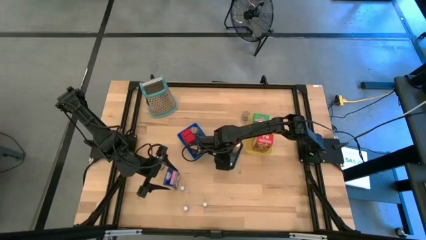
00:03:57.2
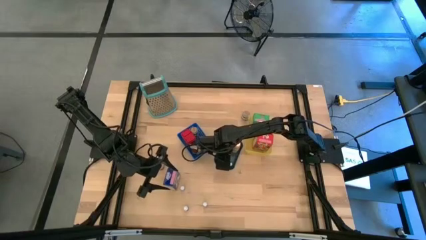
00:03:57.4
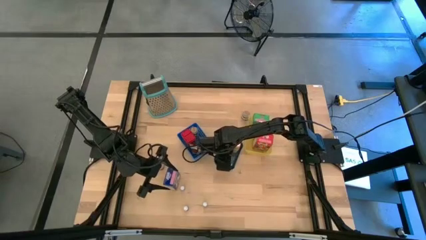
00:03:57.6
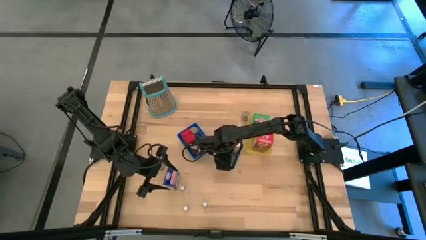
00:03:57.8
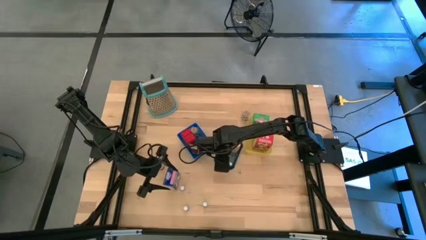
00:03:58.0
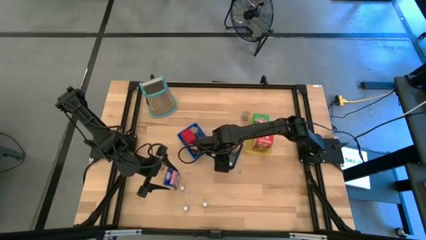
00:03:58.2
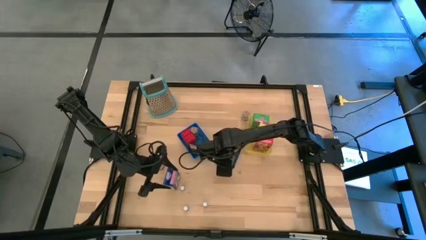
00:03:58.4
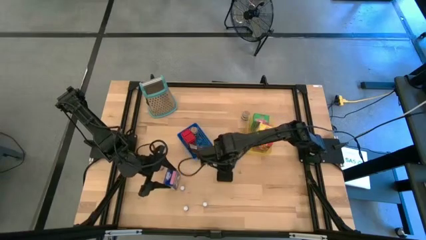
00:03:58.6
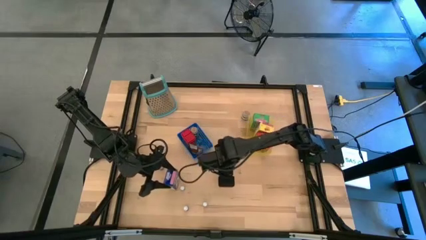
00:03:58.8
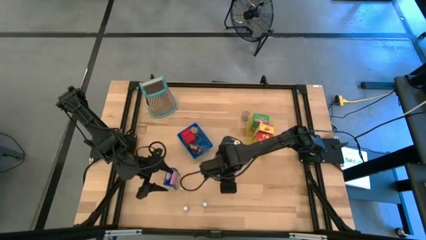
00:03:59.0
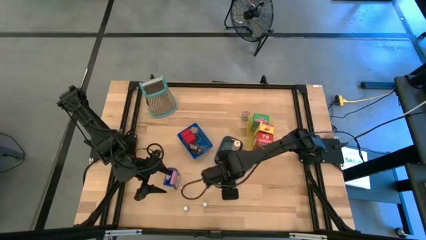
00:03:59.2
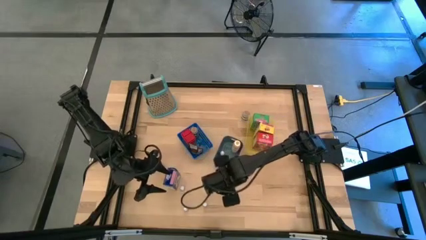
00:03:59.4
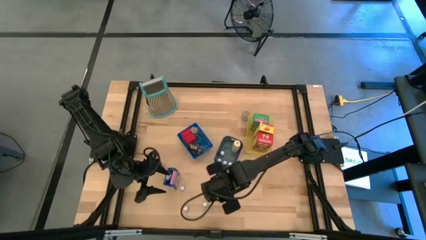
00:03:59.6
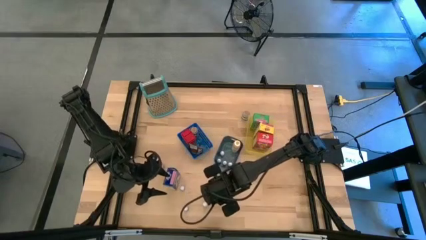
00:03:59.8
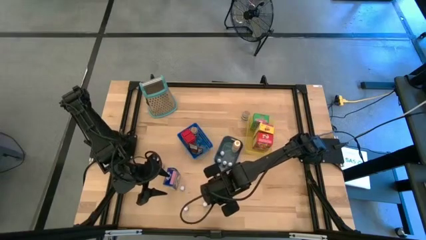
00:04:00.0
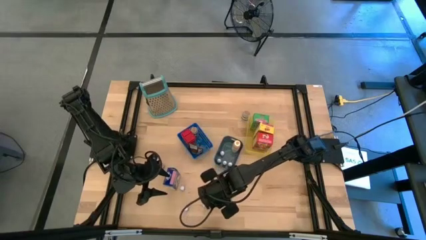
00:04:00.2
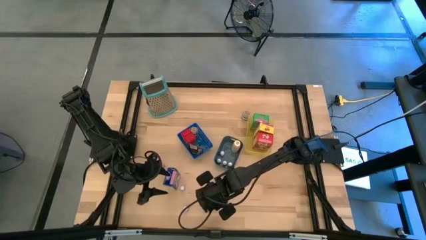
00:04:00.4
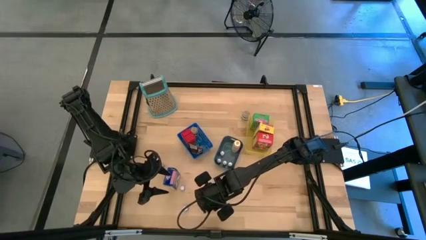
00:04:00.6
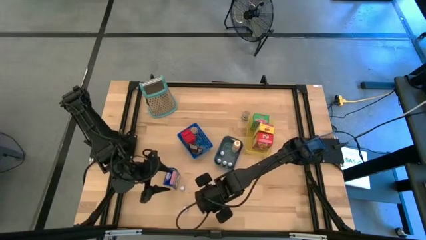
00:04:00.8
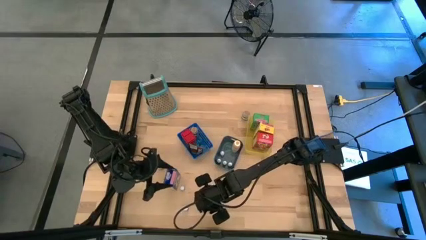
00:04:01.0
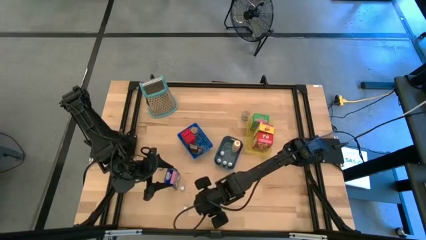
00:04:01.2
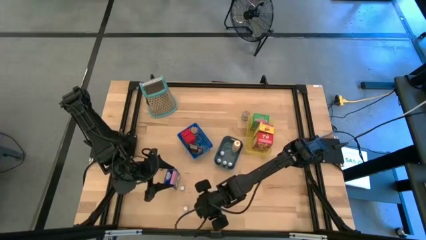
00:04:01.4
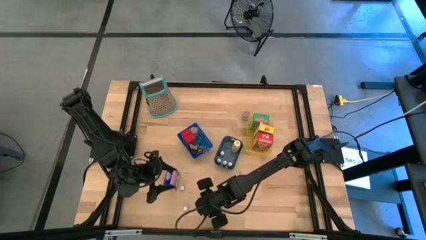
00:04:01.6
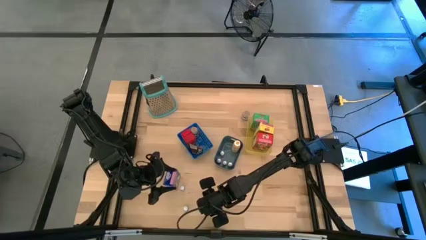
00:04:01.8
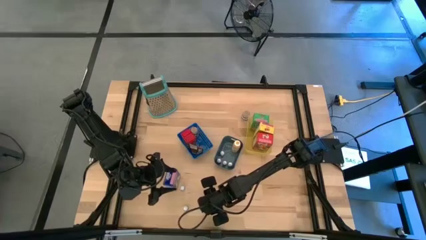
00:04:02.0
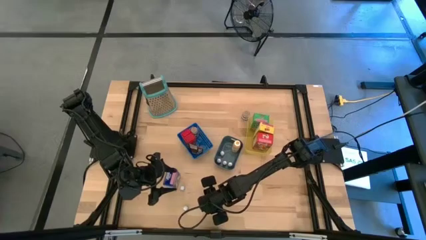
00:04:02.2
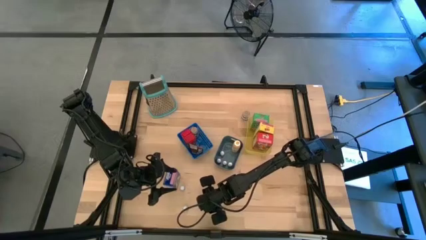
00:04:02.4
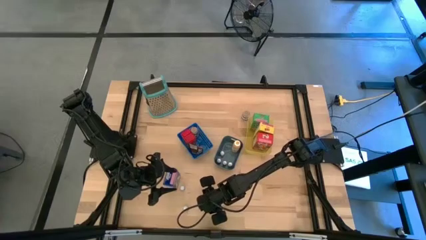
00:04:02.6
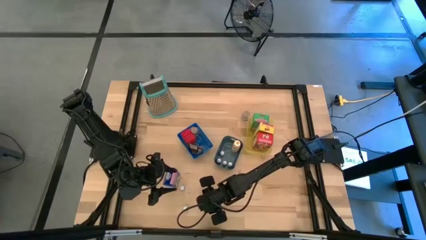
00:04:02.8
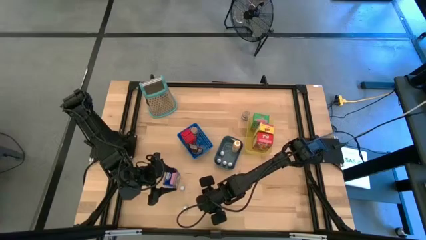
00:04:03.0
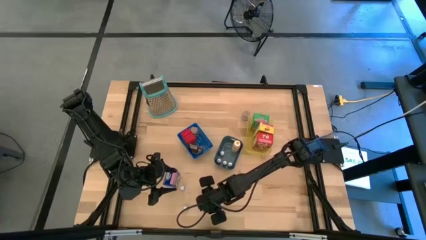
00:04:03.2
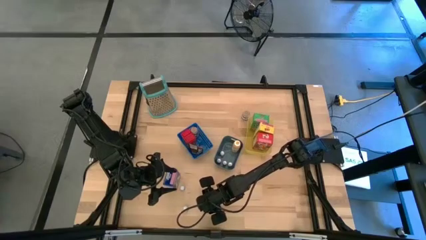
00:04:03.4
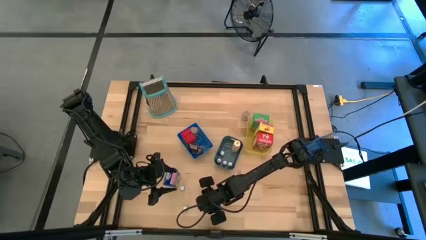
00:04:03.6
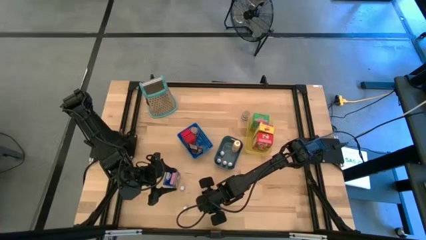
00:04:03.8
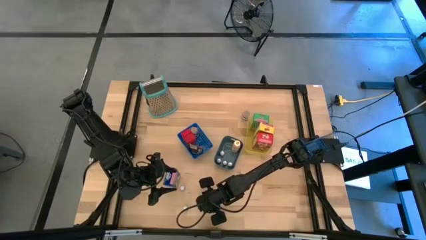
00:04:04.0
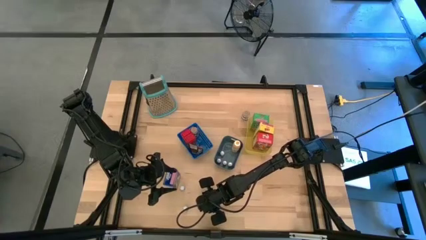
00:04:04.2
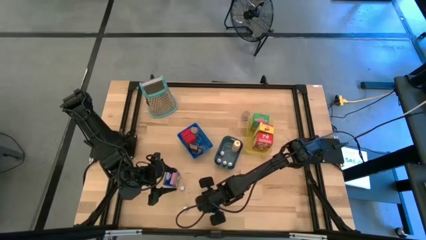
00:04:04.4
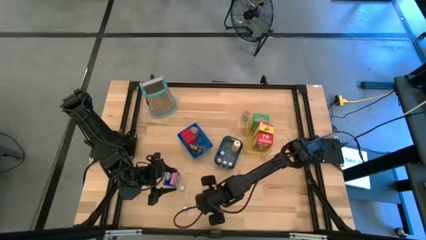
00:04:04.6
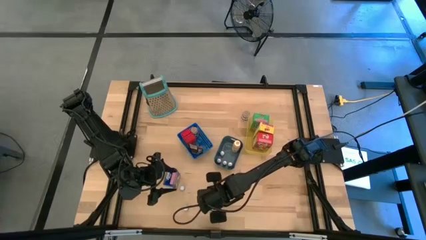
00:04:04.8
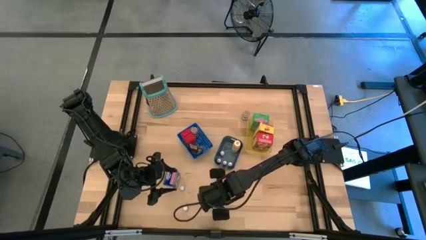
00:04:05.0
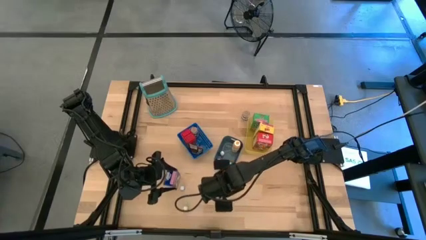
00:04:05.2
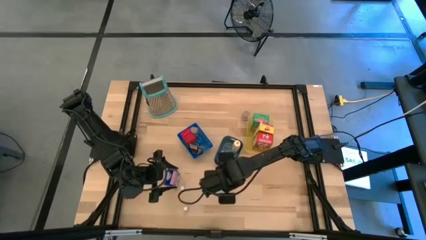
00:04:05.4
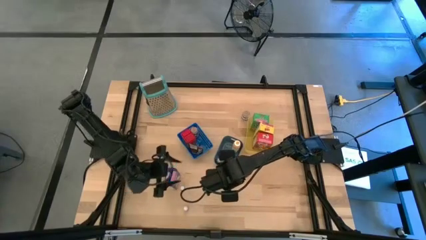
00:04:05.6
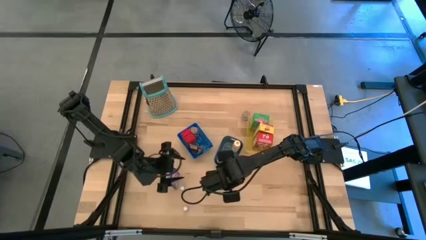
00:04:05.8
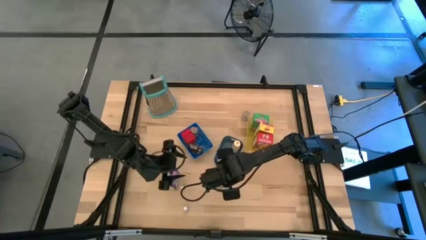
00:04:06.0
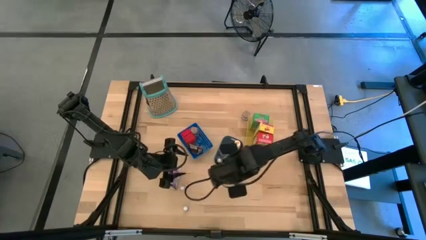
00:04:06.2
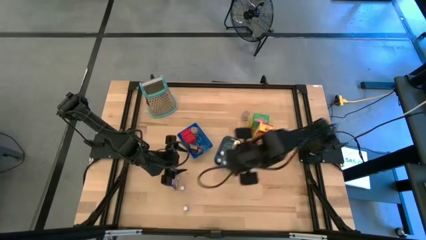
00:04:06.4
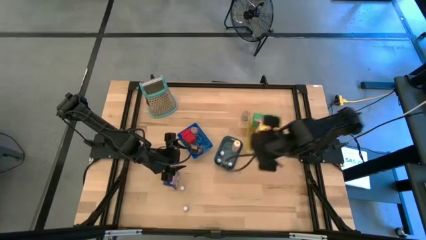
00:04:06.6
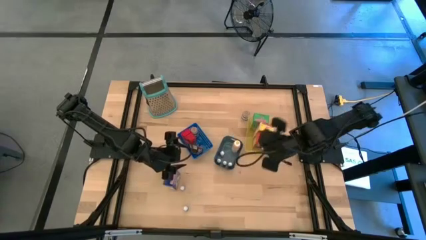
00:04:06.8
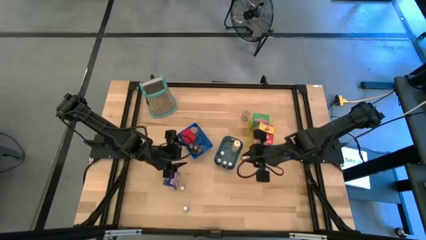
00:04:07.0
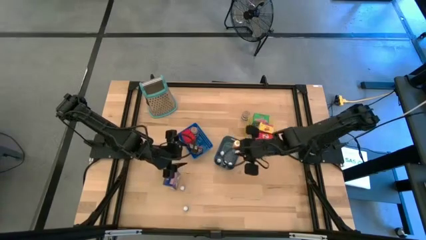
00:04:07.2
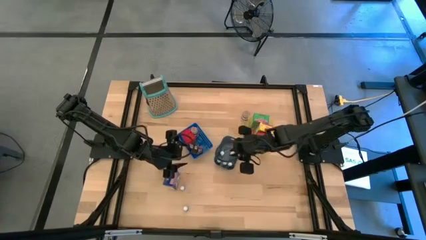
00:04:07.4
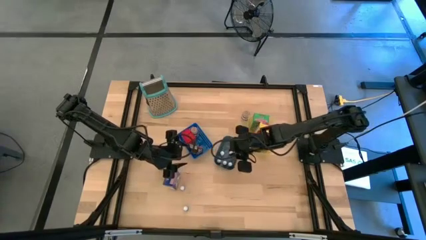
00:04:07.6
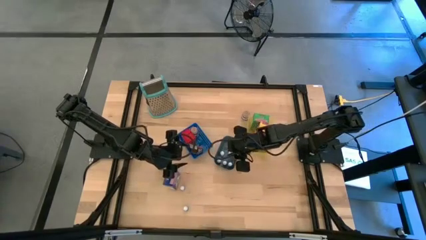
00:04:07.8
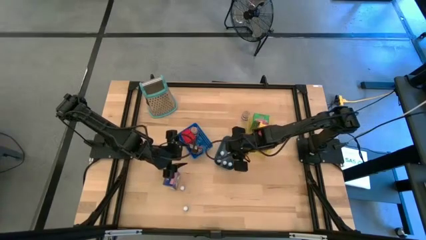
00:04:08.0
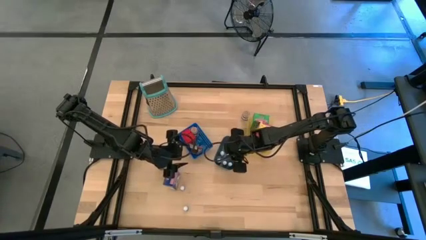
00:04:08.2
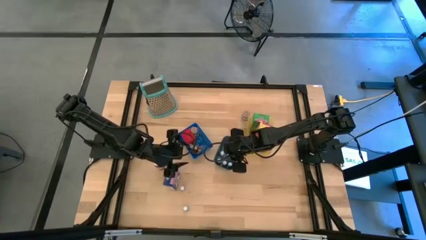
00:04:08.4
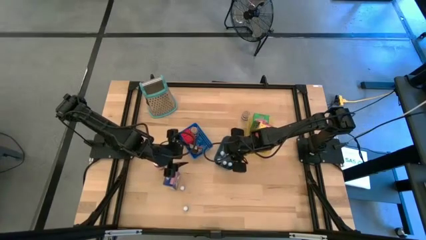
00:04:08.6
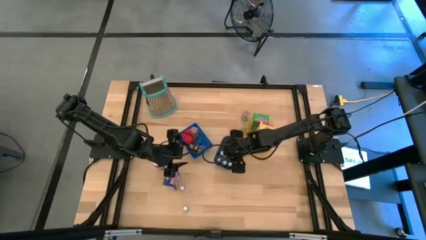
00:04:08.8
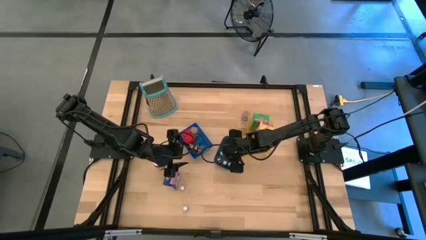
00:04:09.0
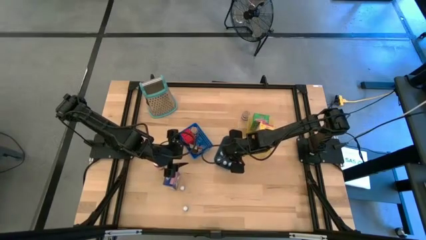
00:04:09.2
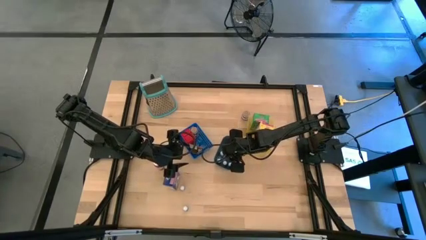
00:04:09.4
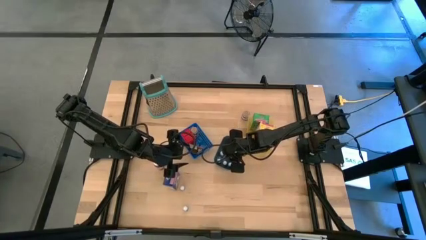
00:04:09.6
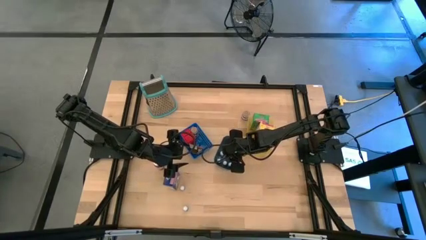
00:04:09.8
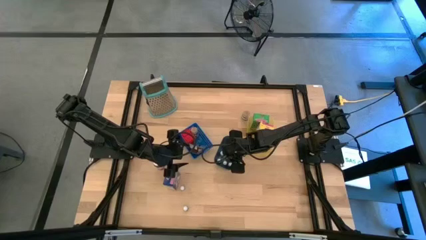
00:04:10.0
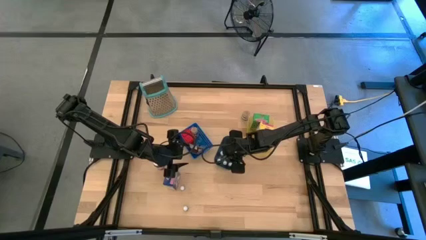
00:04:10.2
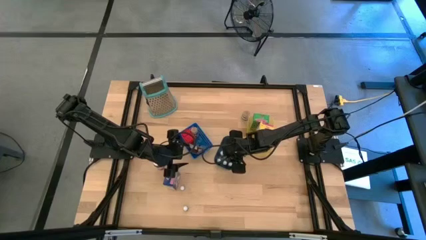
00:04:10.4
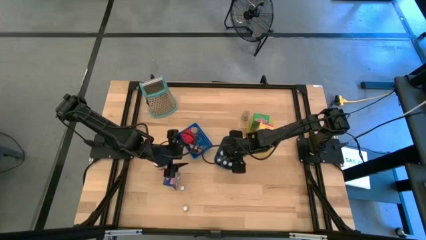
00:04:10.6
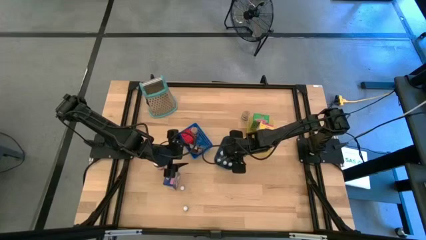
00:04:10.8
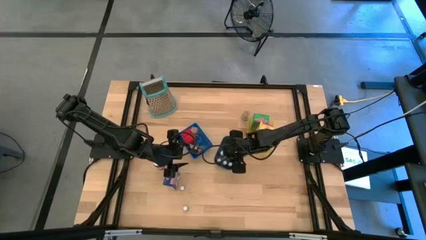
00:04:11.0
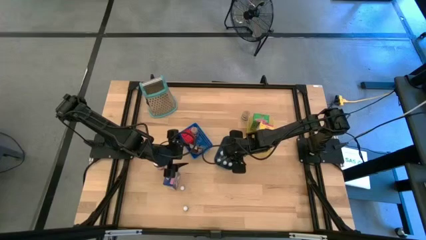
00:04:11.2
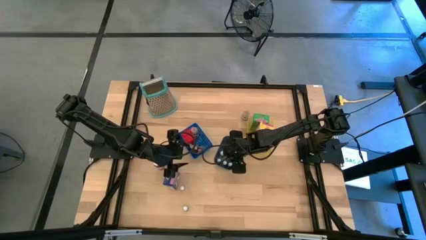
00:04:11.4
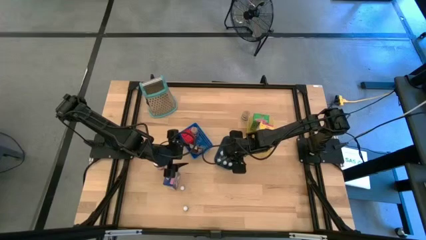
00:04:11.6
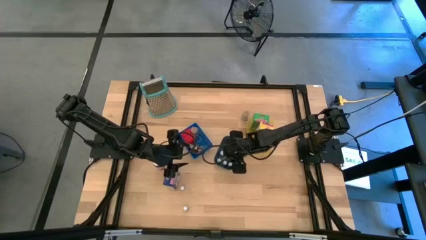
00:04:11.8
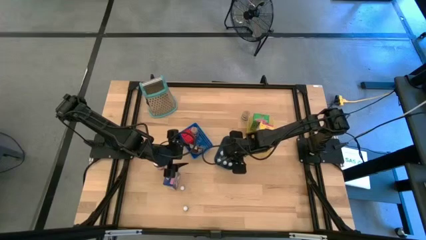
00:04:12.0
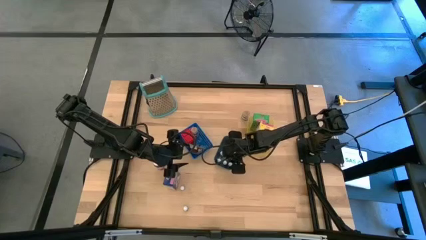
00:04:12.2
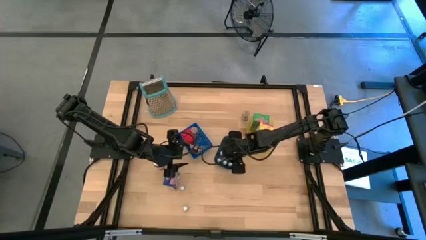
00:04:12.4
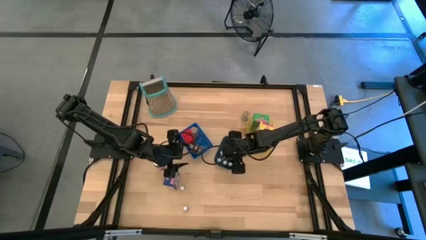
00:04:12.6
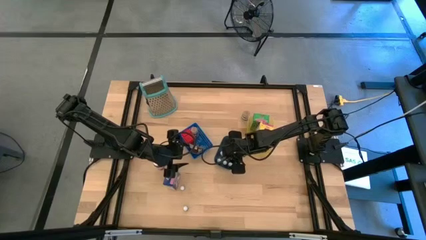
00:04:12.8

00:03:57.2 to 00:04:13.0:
Task: Pick & Place Kitchen Items
Put the purple food coloring bottle into the green bin
